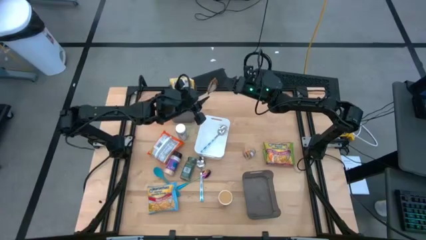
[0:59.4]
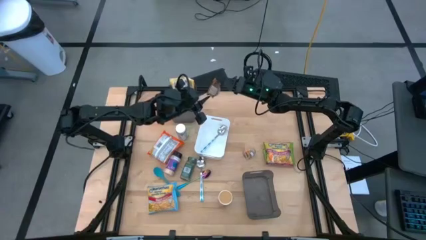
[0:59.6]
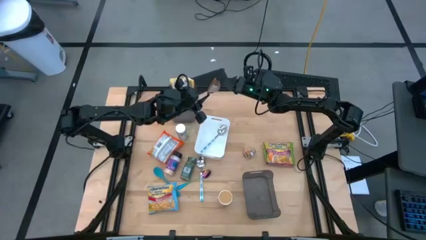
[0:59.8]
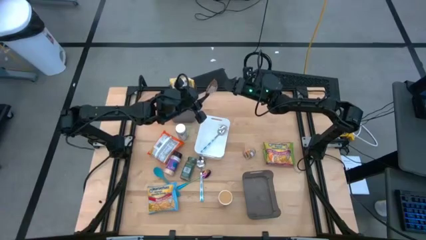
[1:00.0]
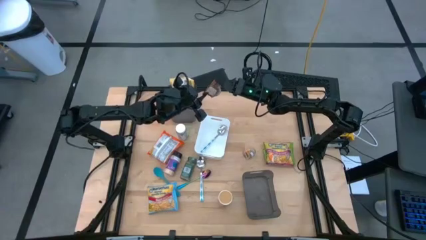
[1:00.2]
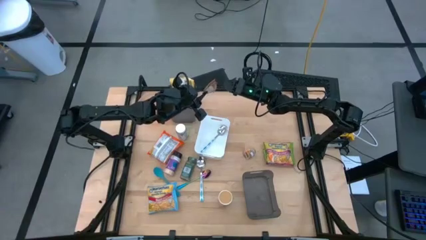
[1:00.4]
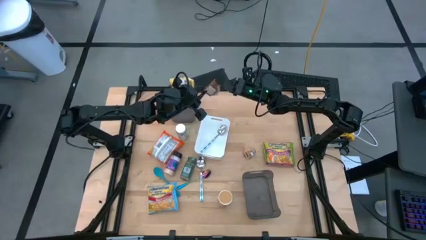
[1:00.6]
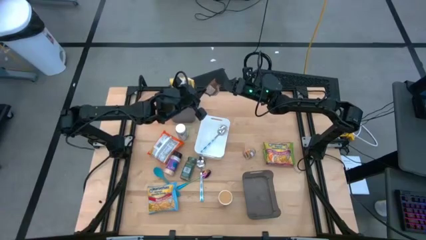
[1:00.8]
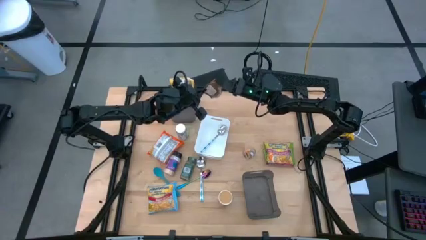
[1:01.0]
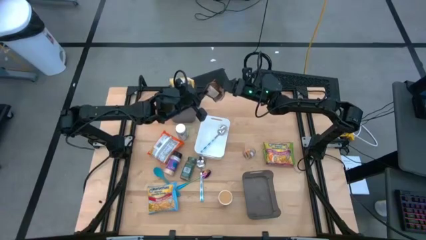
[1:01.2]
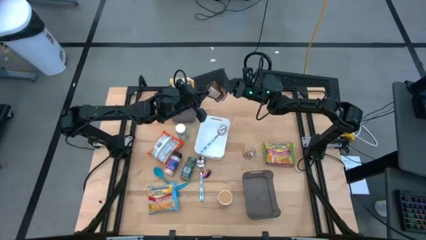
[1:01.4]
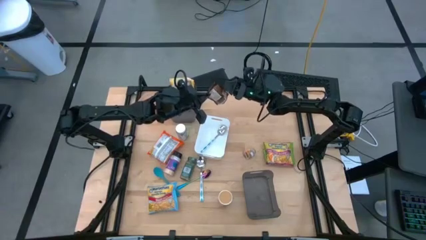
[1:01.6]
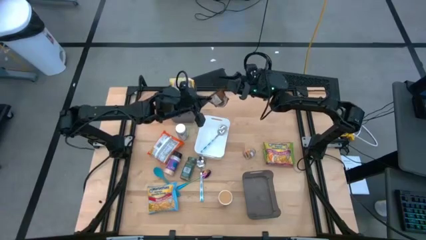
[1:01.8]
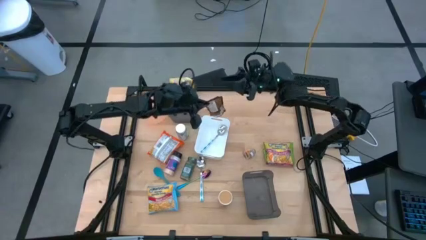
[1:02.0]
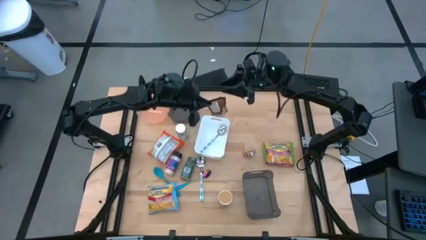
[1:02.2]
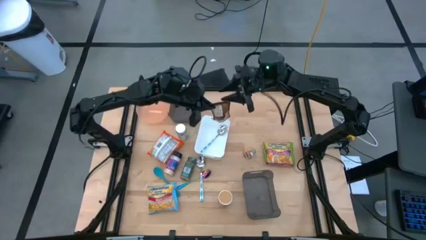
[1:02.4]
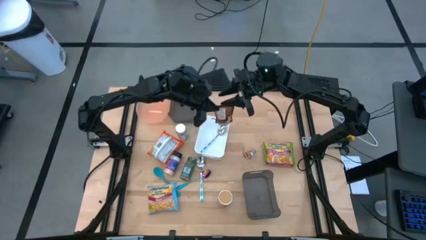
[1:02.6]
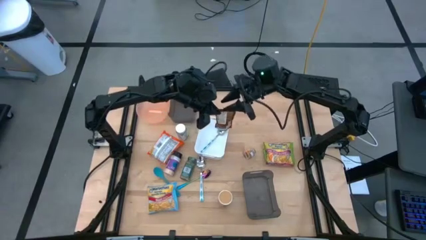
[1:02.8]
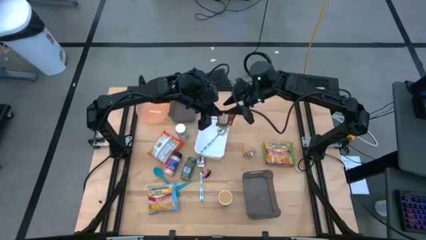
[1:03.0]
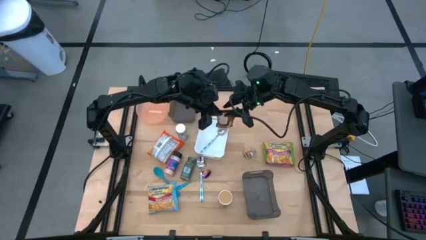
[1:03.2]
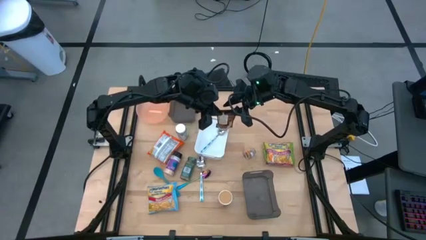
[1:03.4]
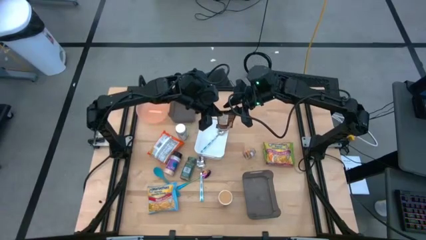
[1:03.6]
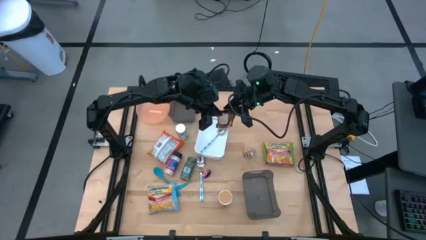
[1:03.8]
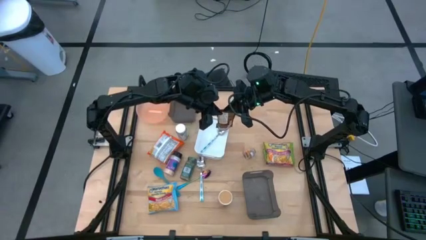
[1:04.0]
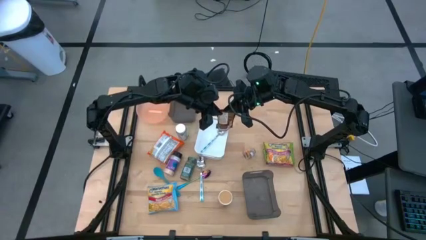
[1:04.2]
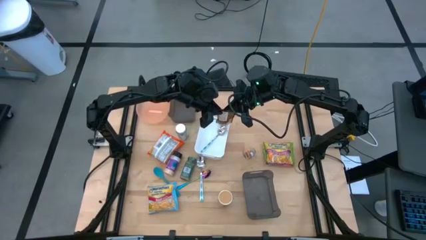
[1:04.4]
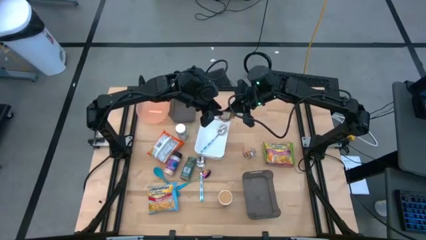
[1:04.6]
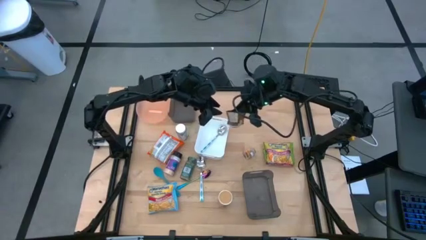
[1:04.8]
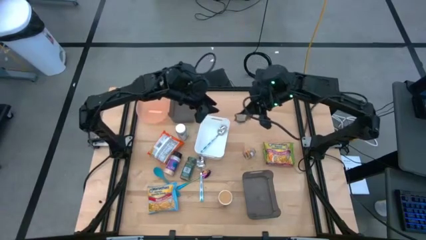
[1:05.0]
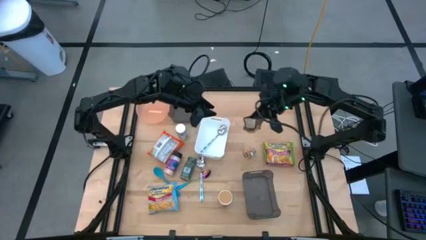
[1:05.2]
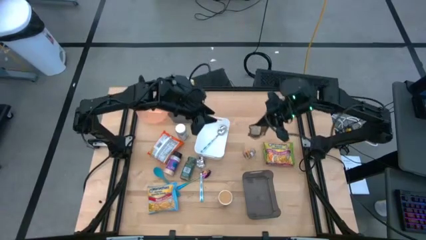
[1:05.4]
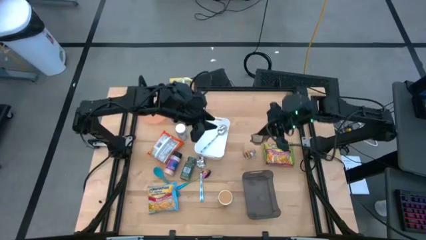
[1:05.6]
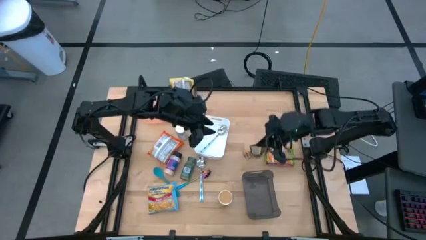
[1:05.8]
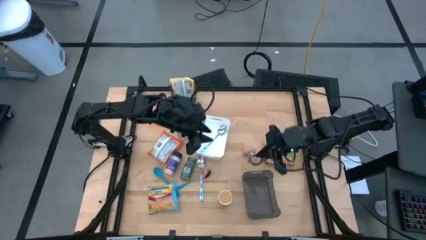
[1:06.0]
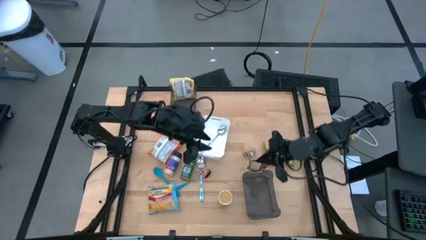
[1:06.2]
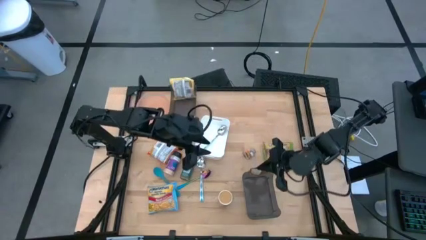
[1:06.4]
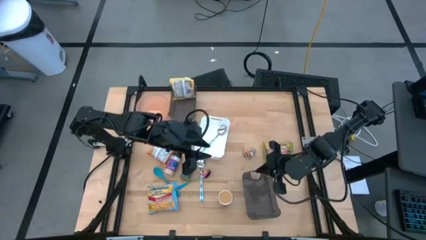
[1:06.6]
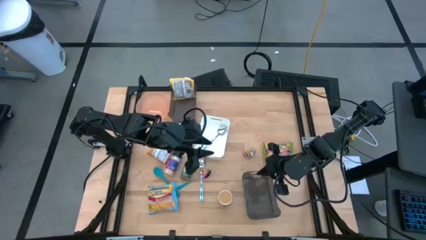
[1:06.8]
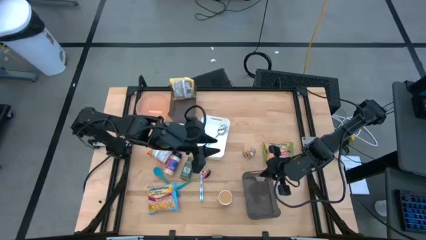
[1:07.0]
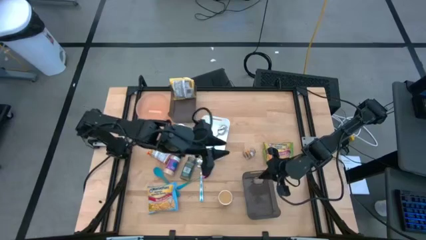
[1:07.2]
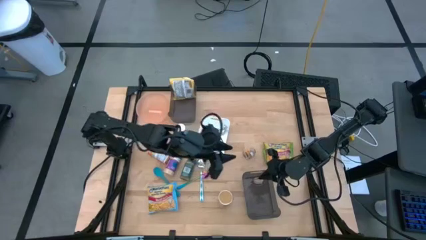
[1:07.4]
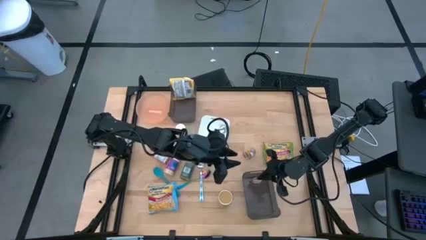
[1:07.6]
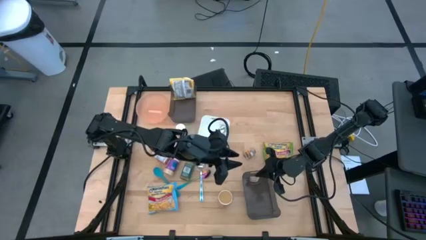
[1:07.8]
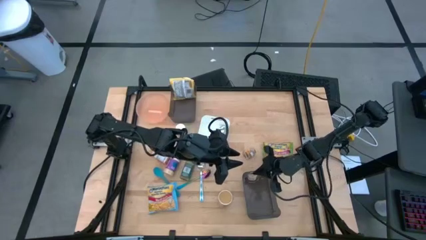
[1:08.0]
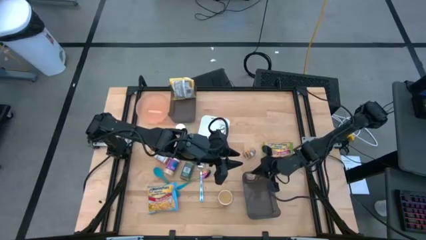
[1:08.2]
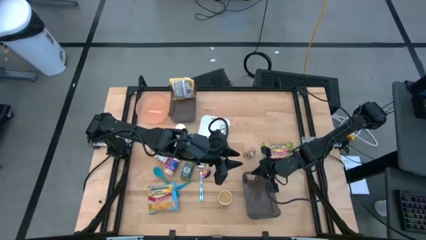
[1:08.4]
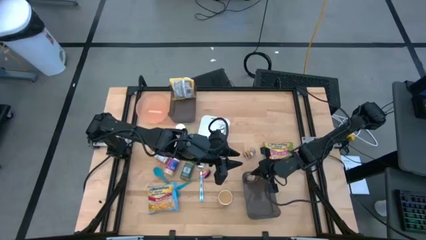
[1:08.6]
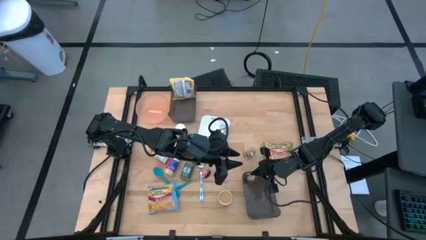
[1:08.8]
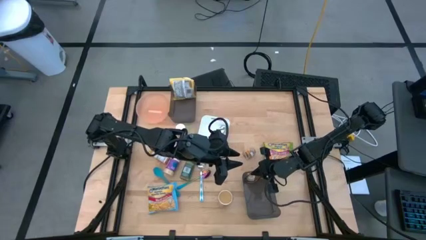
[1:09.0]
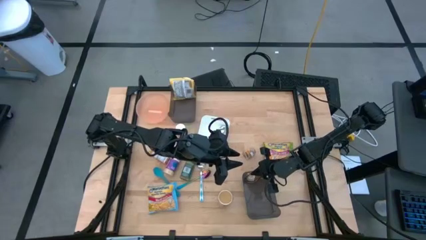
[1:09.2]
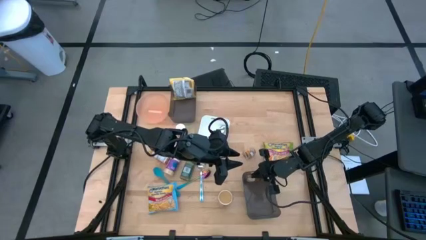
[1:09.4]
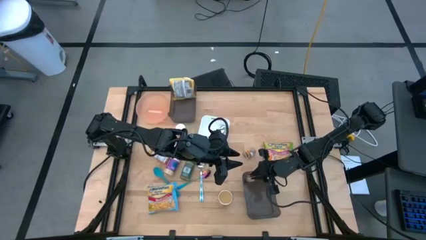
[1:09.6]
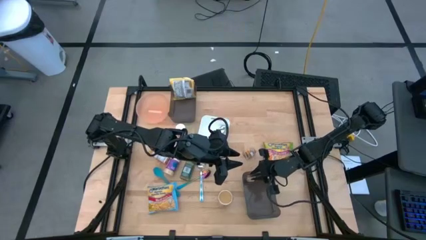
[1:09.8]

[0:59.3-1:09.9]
Task: Pick & Place Food Item
Put the orange seasoning pack into the bottom black bin

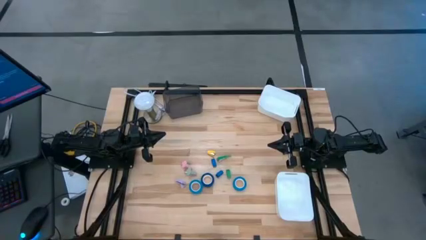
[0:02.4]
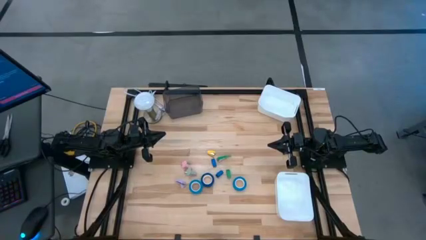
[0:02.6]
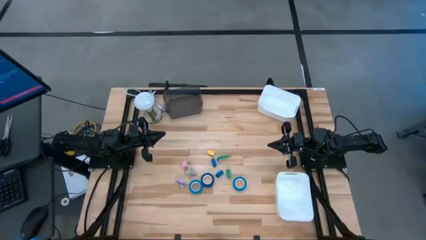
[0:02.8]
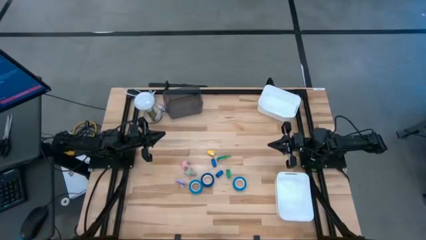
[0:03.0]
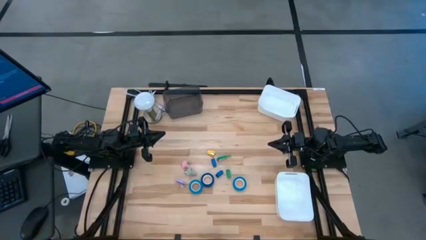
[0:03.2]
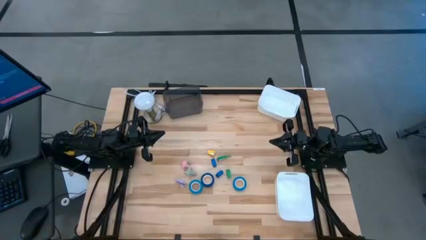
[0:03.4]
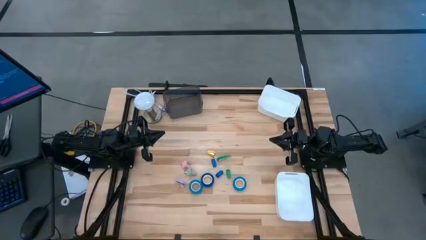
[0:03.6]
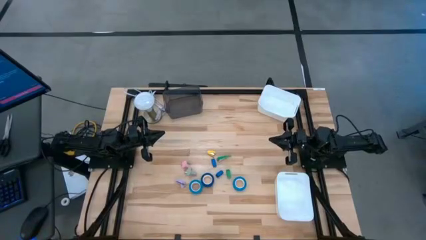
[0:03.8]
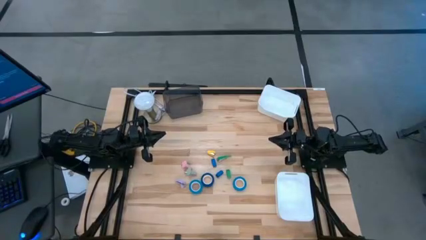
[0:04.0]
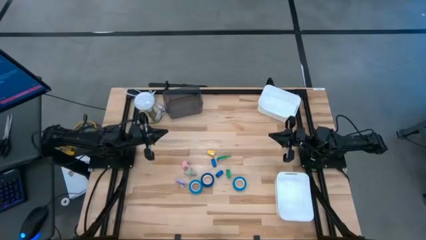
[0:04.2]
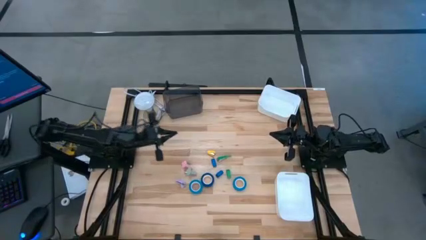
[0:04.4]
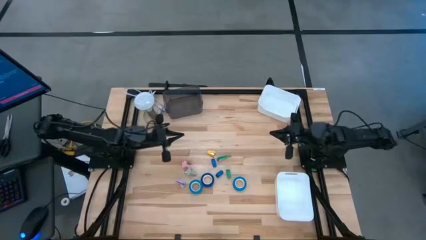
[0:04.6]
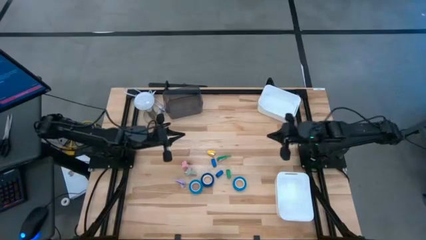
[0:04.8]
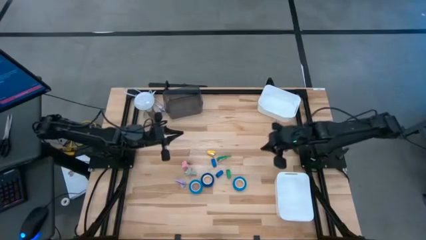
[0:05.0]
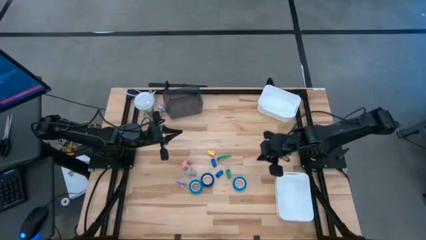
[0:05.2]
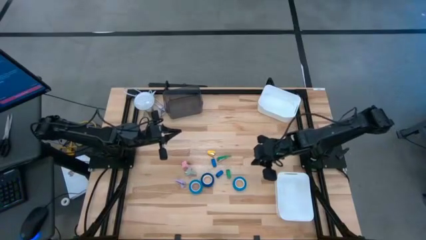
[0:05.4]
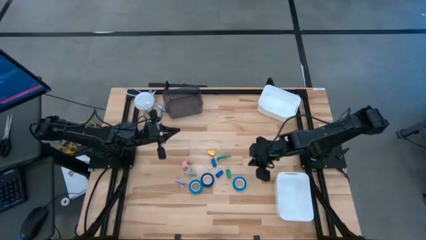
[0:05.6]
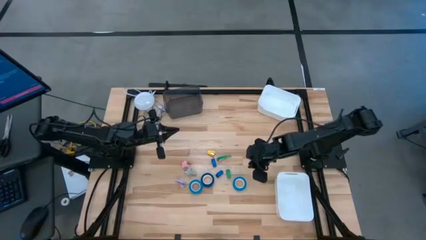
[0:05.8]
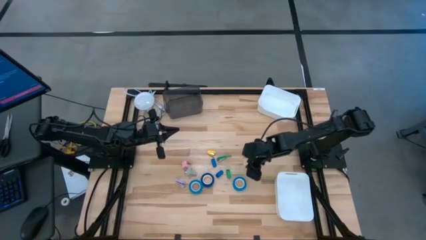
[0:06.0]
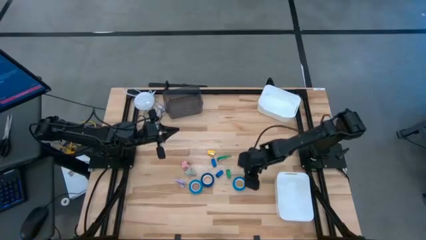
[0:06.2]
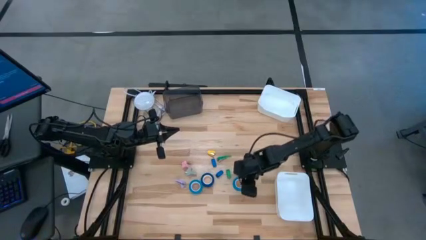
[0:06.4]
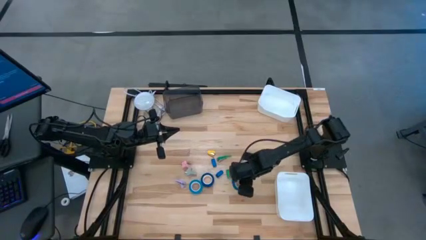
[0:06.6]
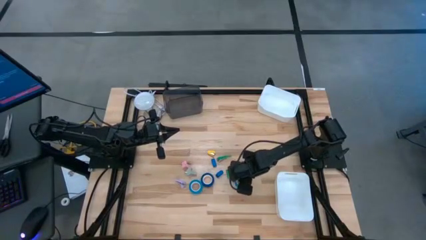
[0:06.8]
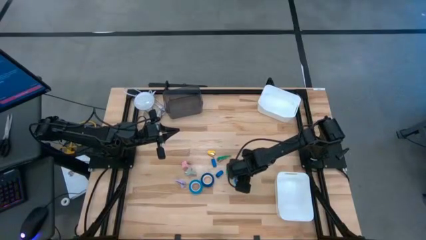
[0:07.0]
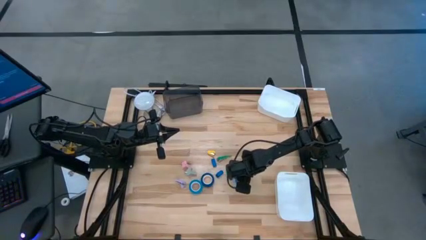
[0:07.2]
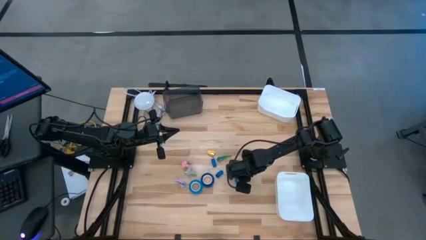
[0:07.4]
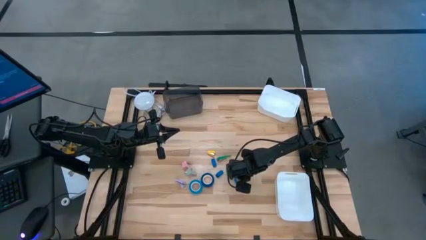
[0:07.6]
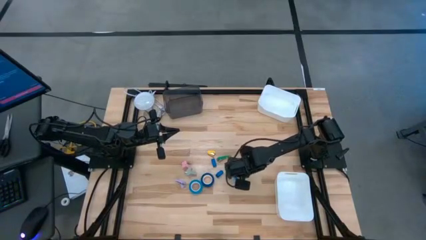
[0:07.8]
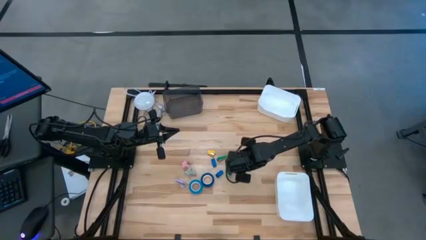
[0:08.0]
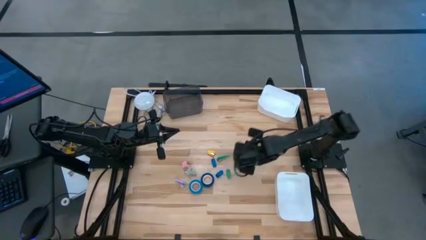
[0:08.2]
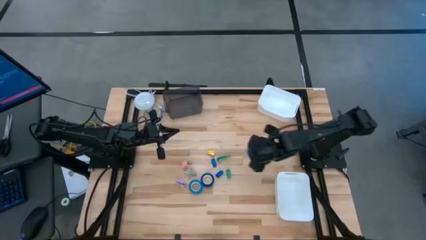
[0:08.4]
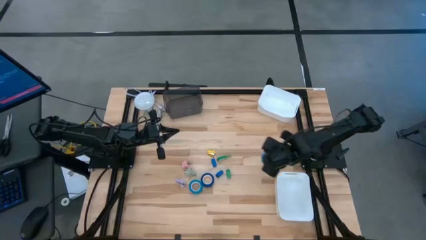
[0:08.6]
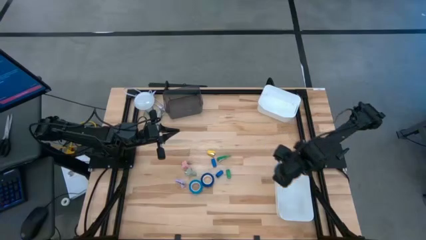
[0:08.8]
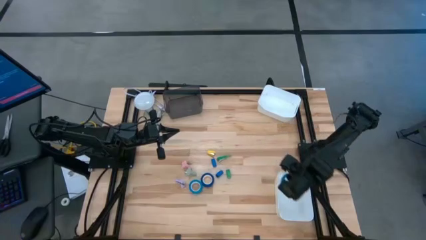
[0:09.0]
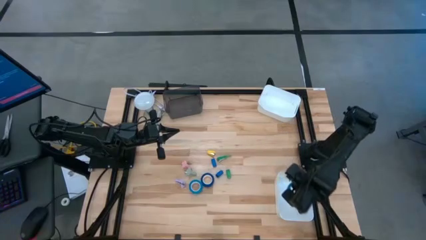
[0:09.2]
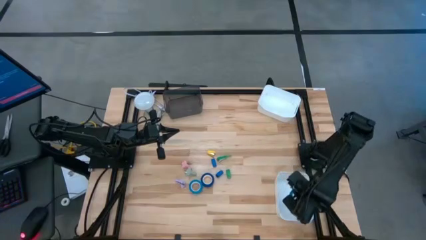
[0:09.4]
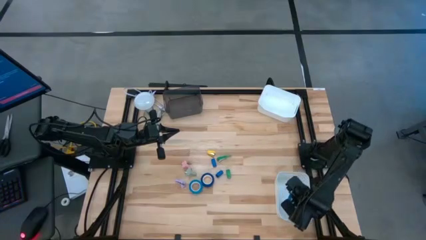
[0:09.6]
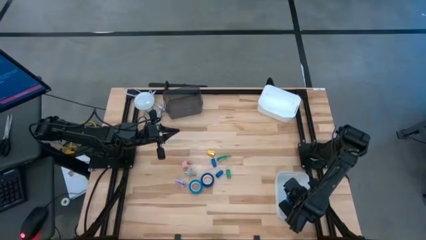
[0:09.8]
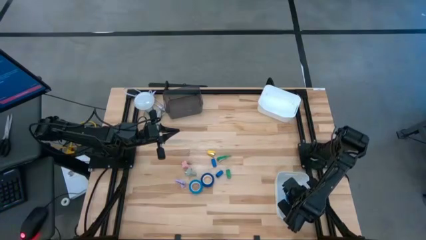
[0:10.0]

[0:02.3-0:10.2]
Task: Pick and place Stapler, Stapler remover, tape
Put the light blue tape into the bottom white bin
